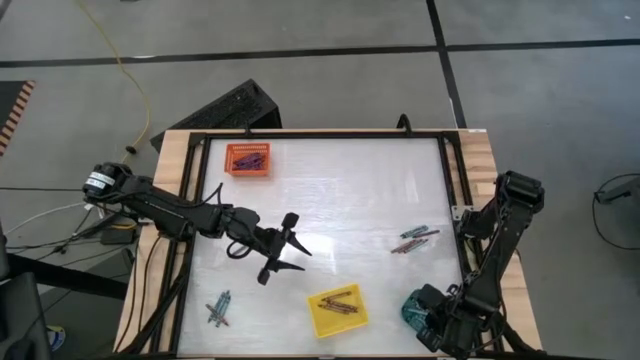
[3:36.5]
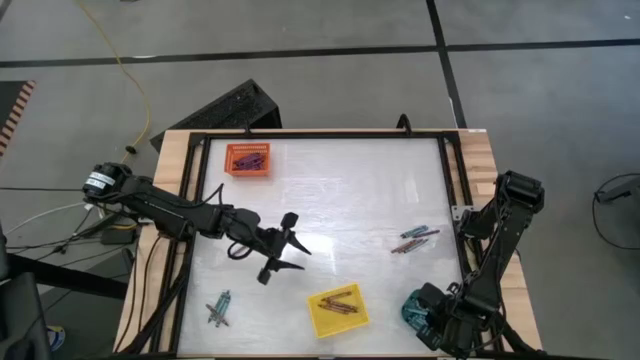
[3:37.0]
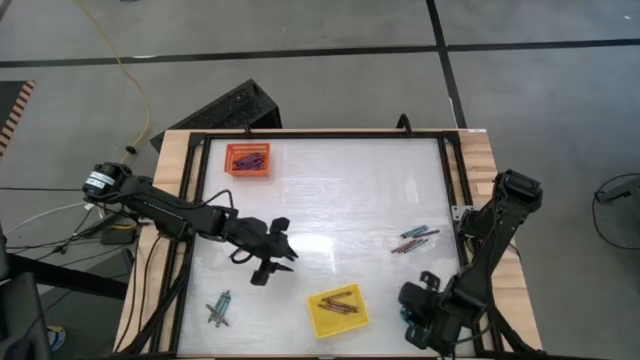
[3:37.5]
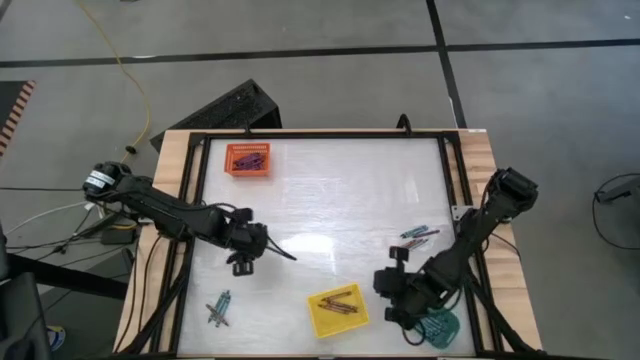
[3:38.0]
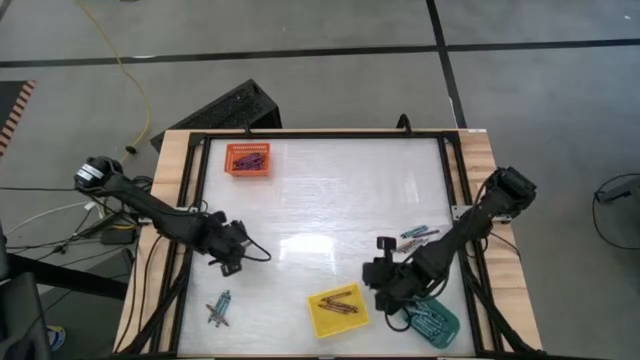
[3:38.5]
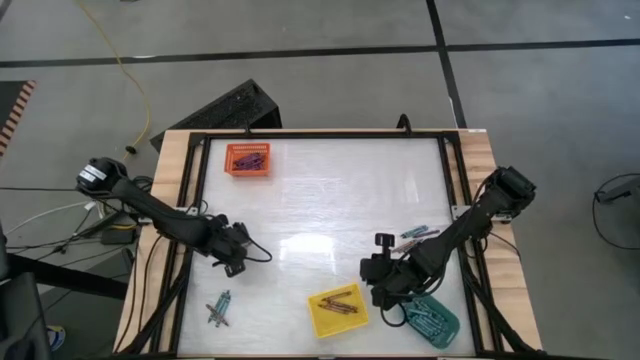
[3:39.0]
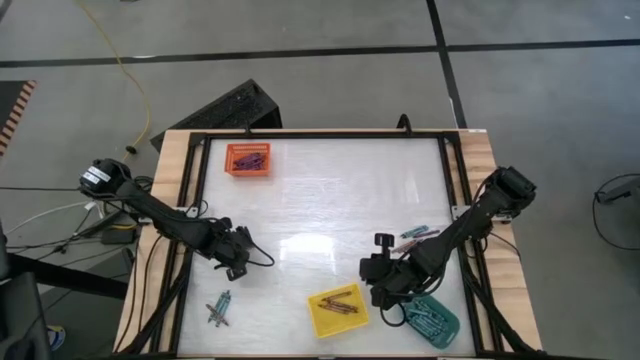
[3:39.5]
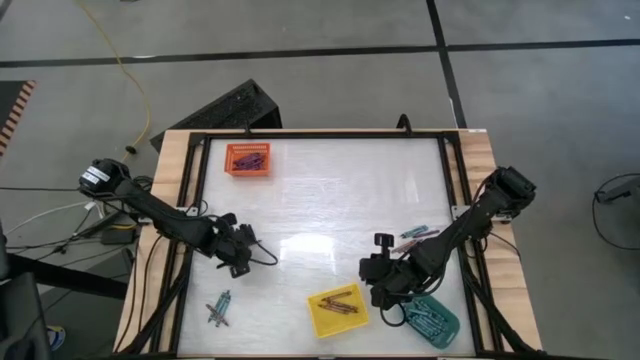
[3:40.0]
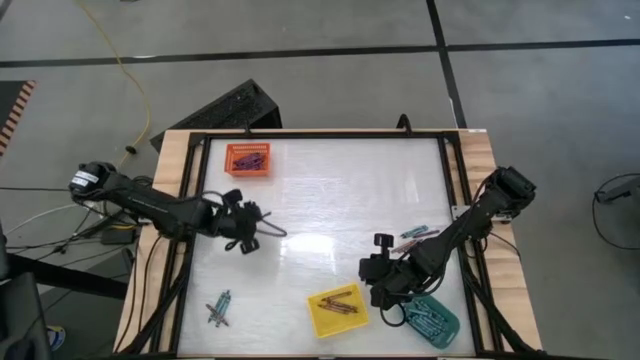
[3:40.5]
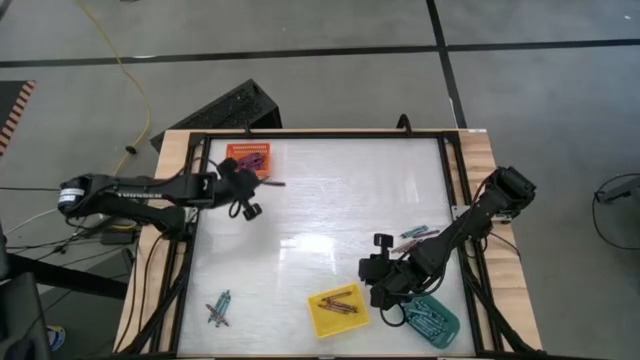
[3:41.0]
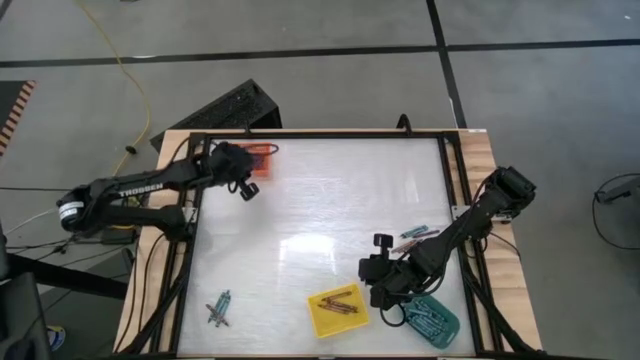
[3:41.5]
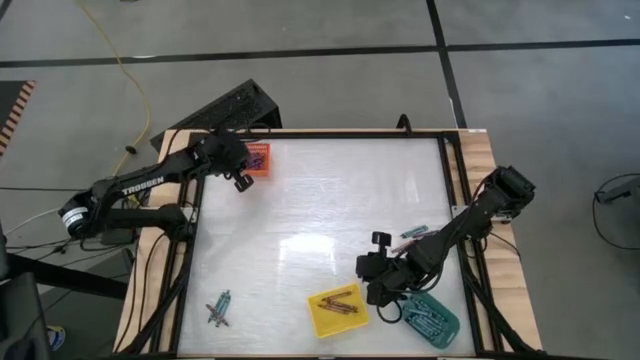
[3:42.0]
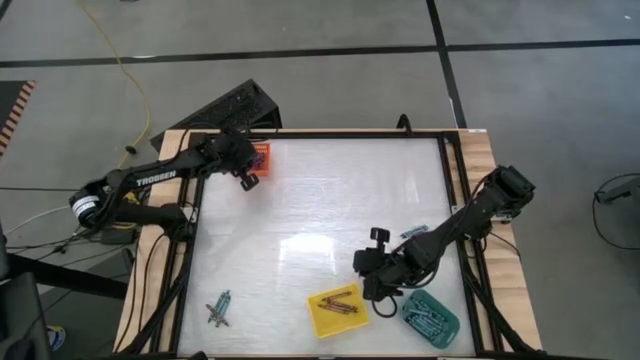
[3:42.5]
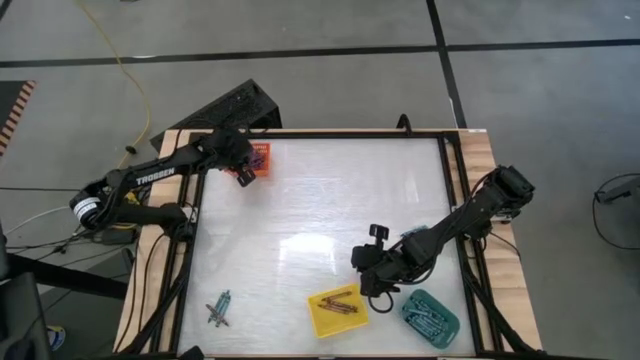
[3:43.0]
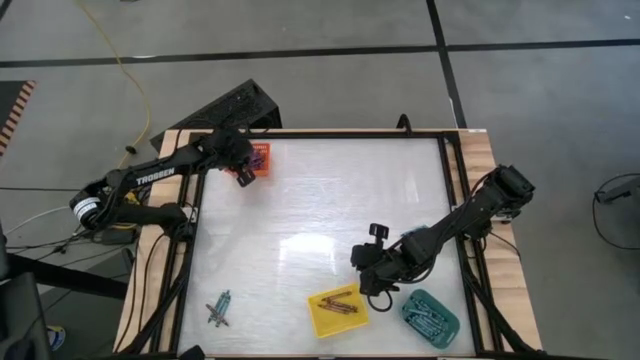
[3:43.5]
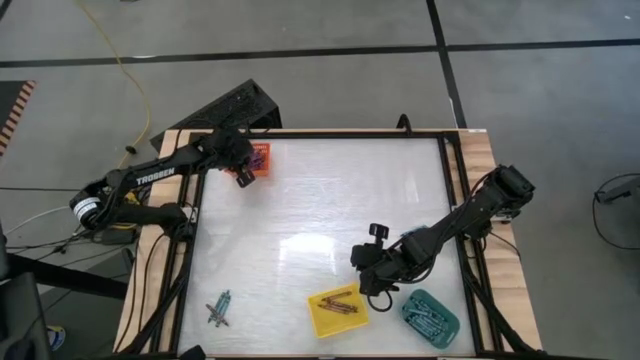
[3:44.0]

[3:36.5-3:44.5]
Task: Sort crayons
Put the purple crayon into the orange bin

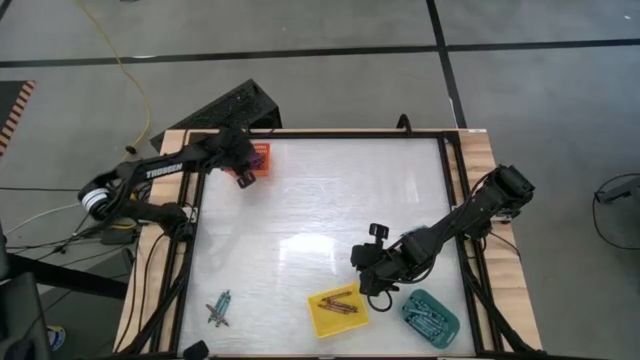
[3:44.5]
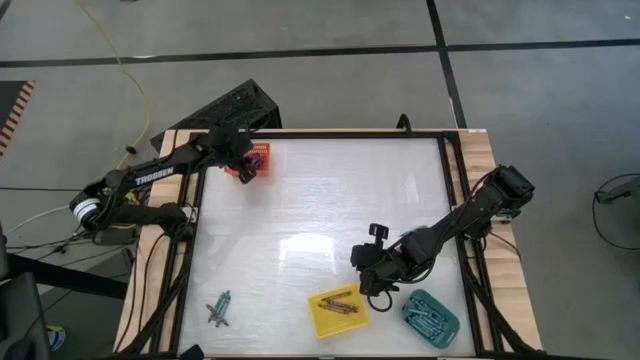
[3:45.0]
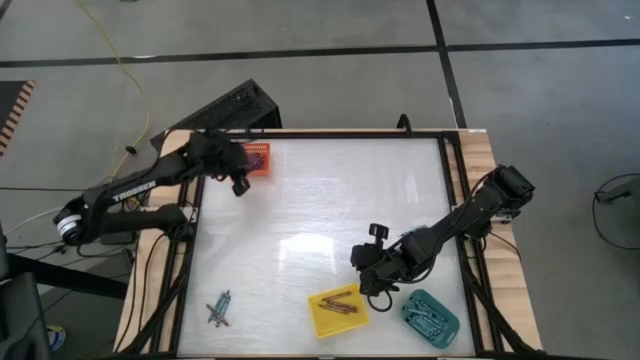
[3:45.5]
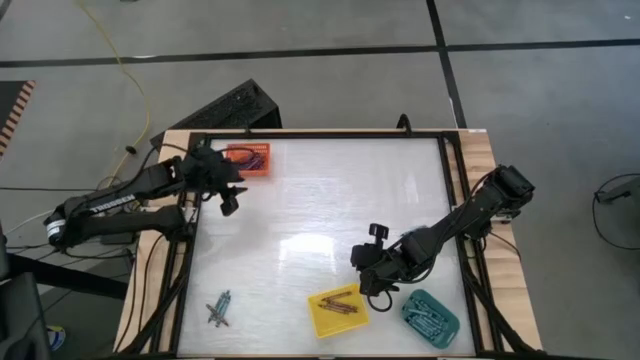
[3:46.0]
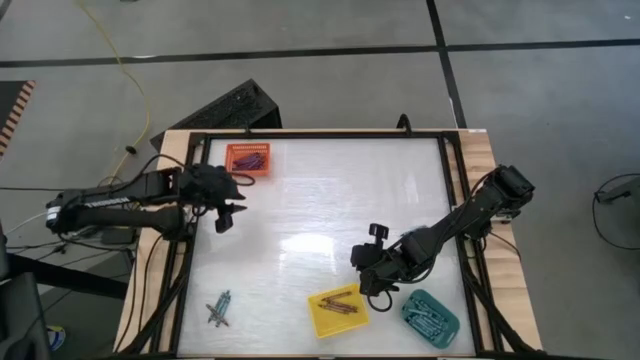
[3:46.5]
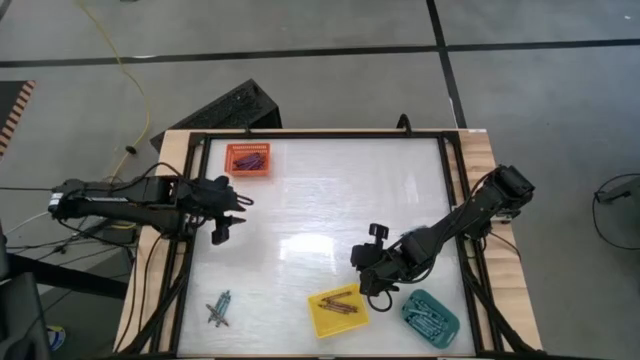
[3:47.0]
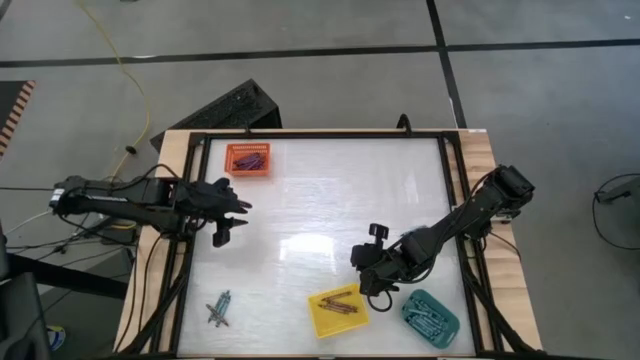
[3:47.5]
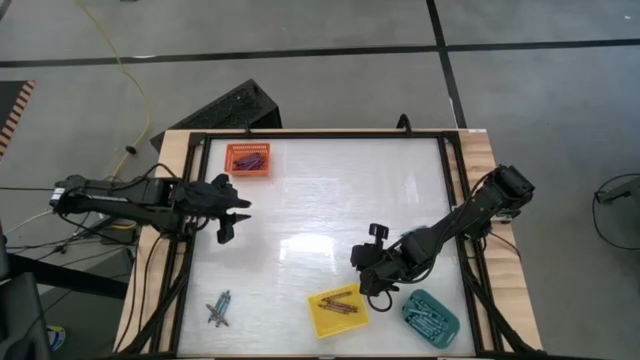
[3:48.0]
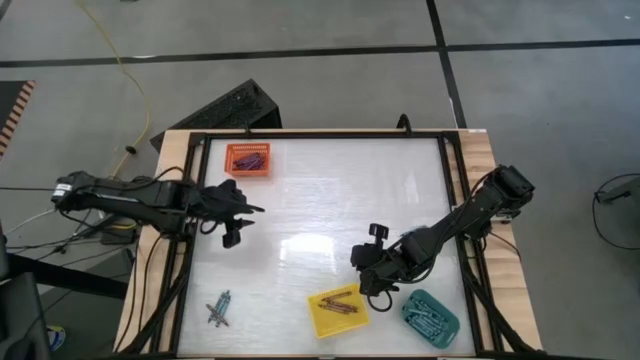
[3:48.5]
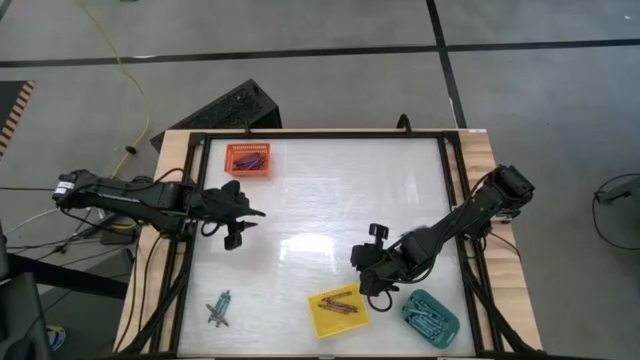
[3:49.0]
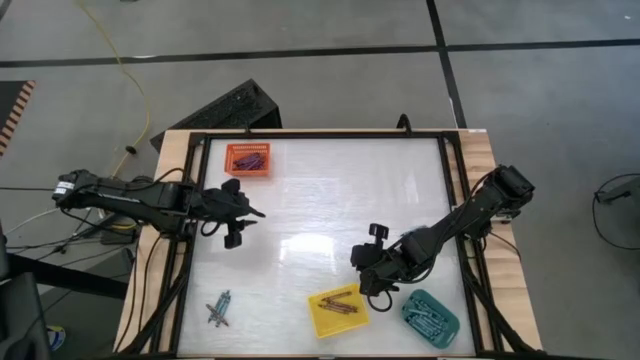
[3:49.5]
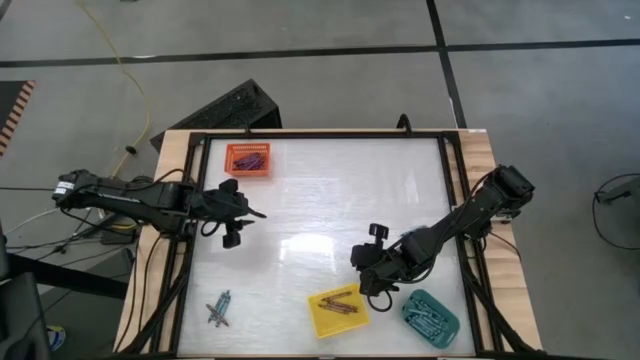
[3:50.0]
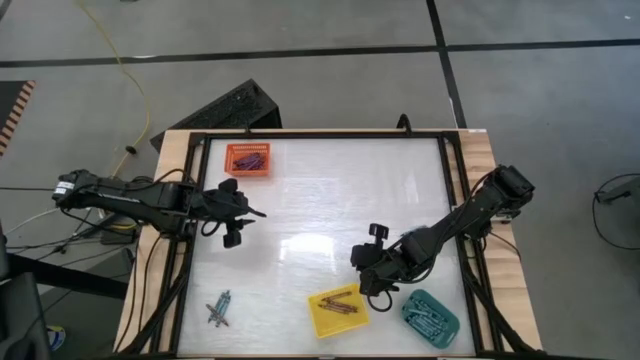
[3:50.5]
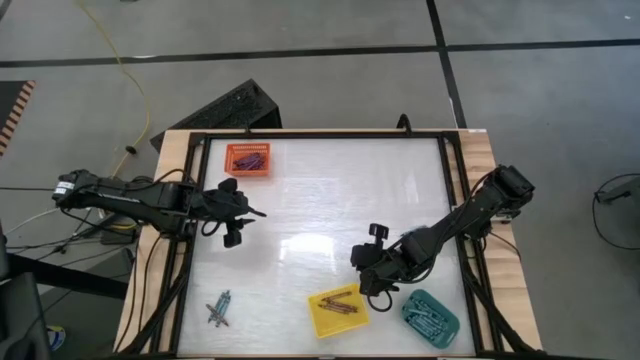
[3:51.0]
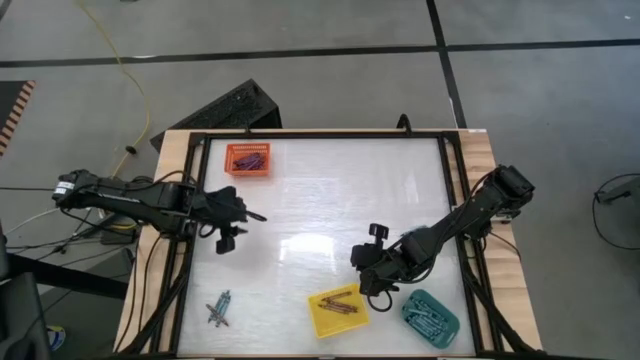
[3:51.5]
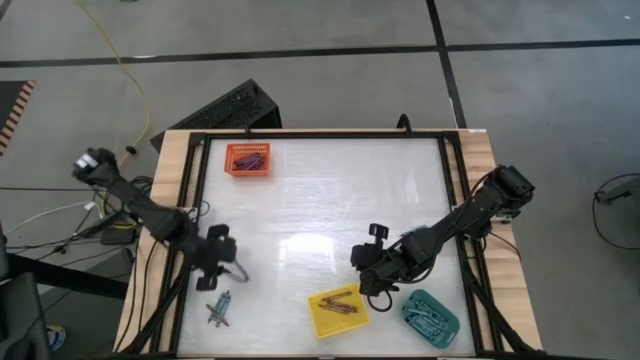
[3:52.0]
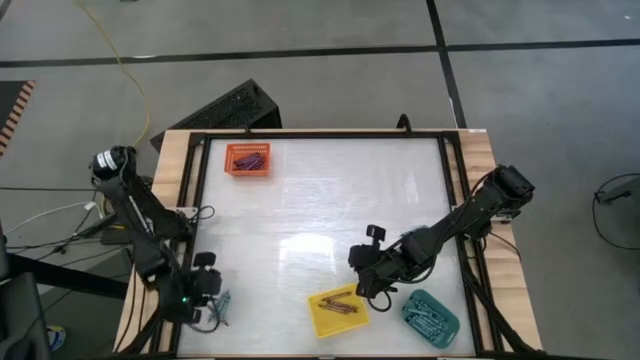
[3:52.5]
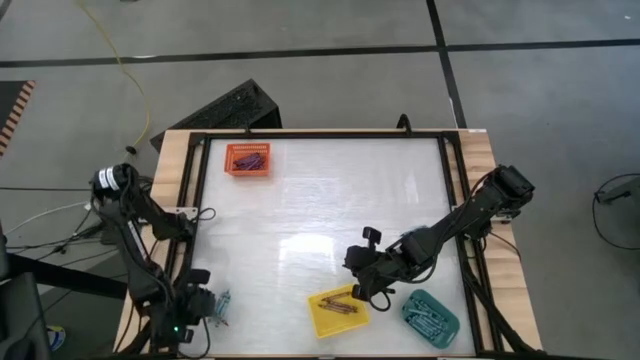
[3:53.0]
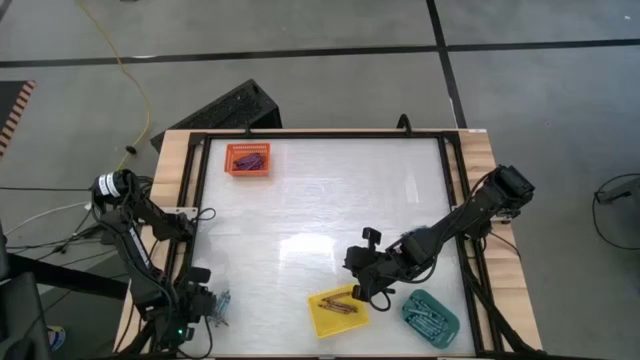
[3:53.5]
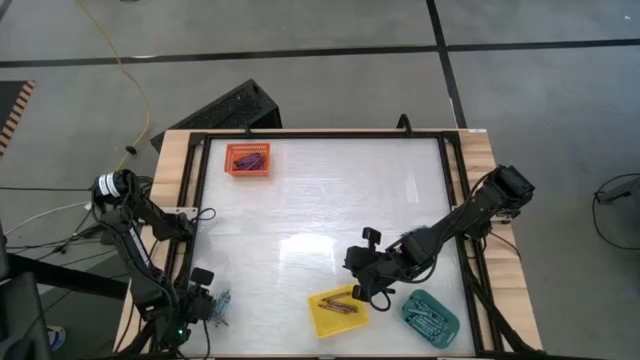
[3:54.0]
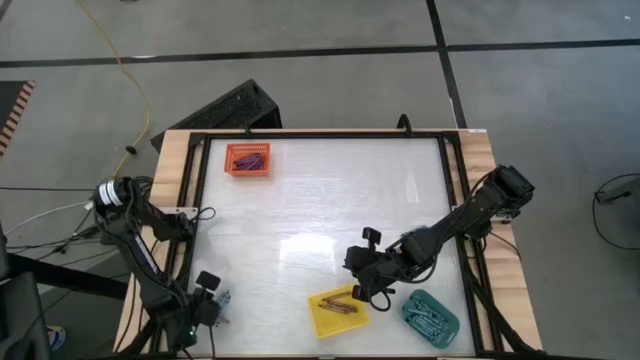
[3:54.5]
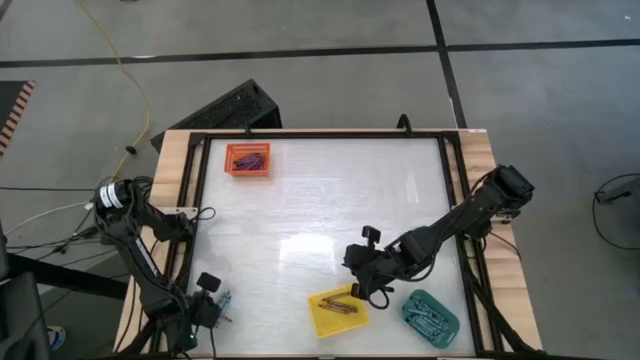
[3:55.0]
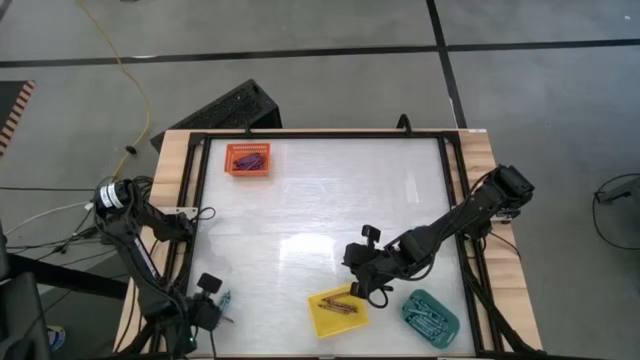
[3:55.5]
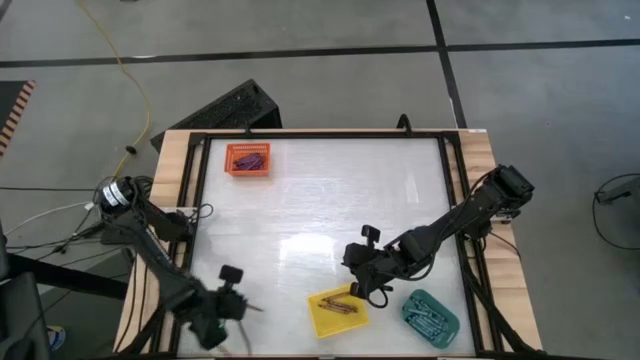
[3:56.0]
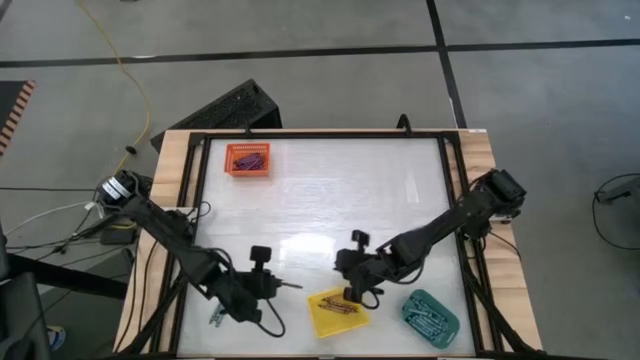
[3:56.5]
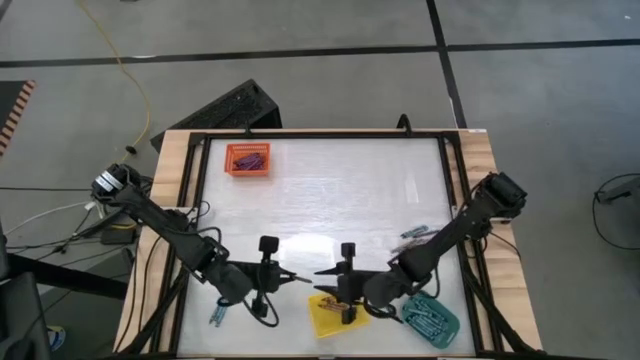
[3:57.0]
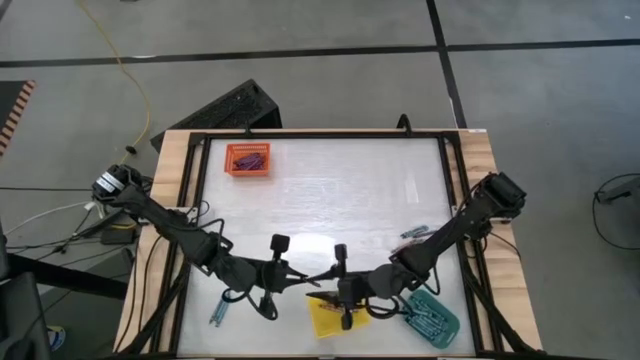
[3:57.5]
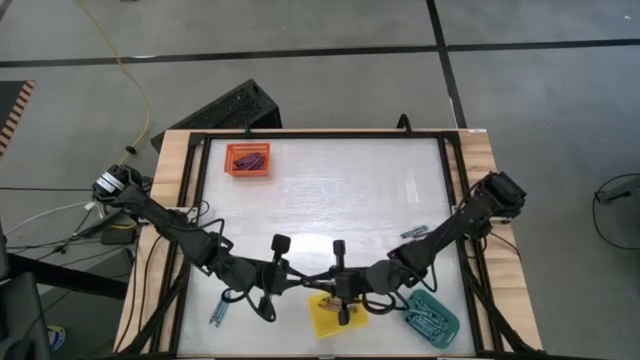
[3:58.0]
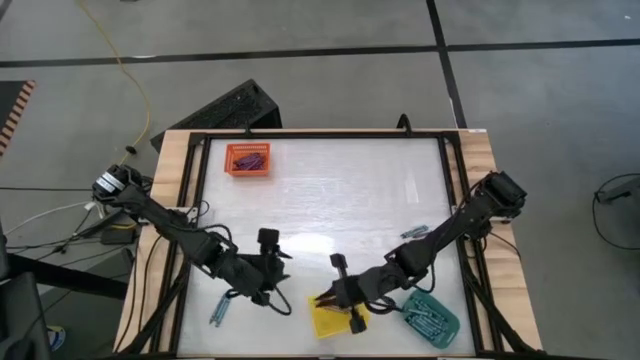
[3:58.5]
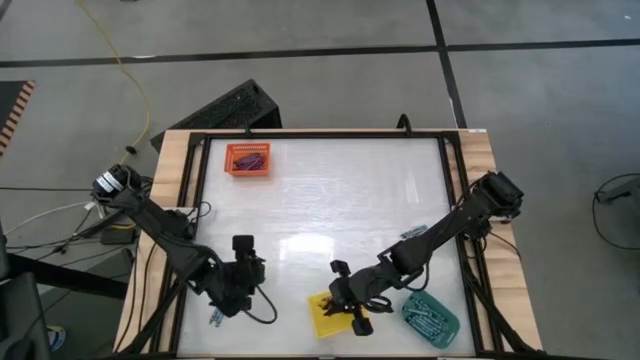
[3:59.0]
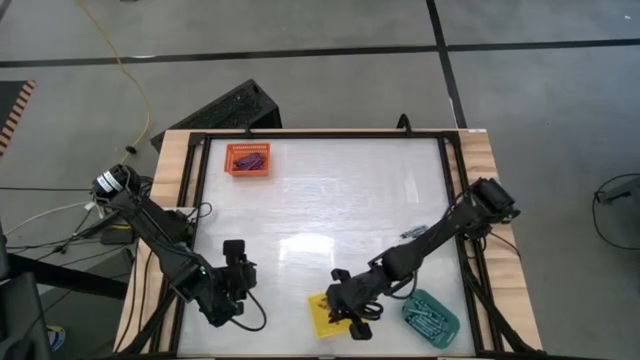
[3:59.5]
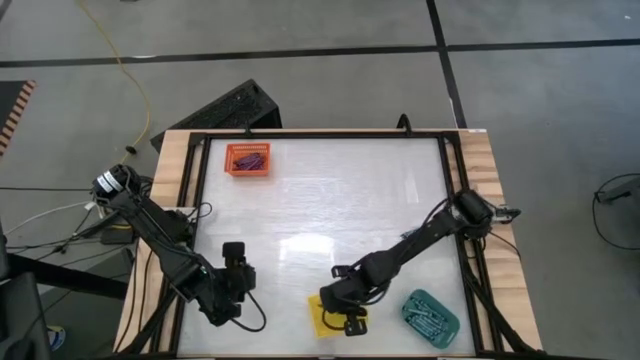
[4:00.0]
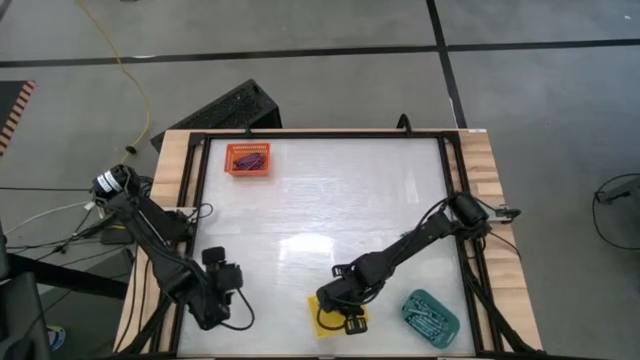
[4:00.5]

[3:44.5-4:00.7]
Put the brown crayon into the yellow bin
